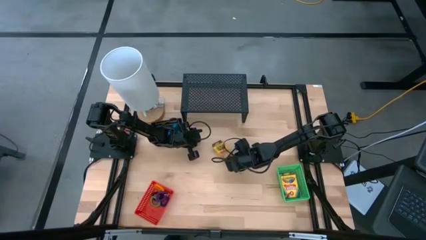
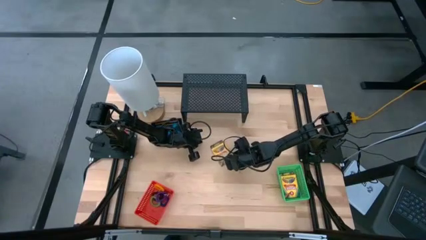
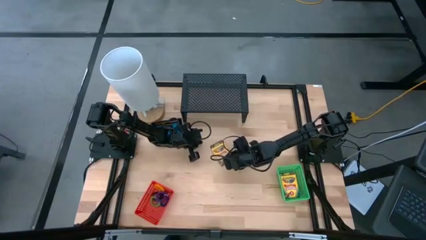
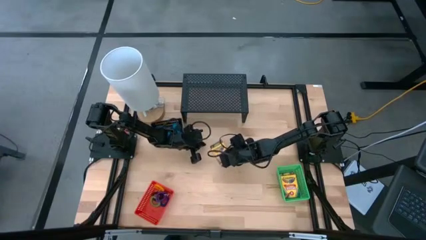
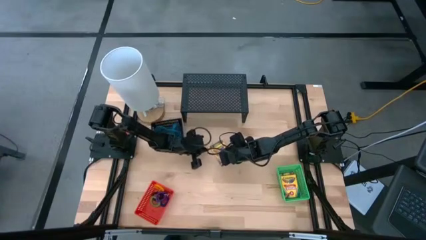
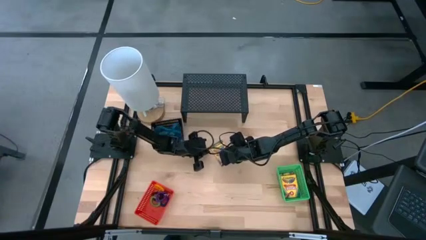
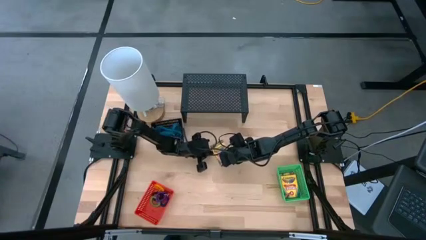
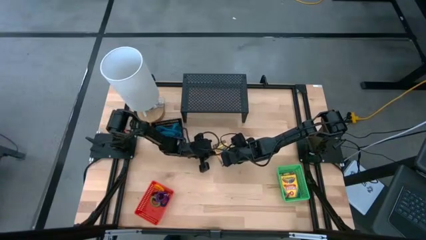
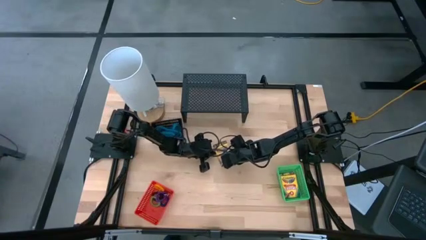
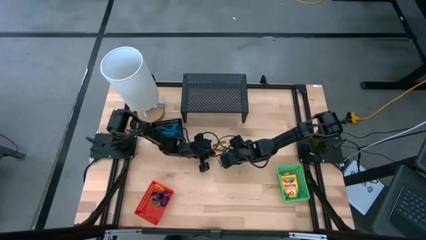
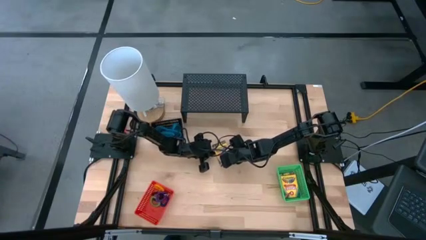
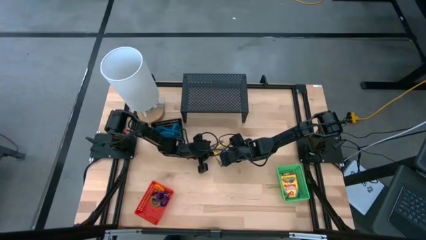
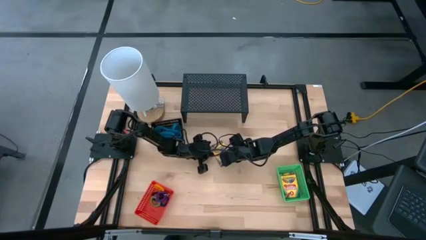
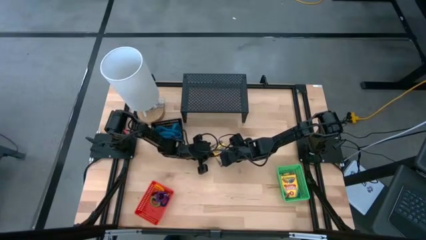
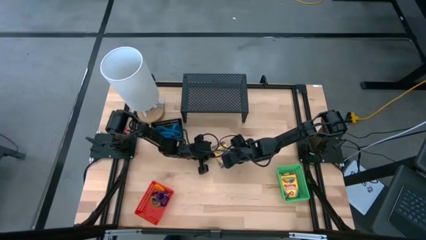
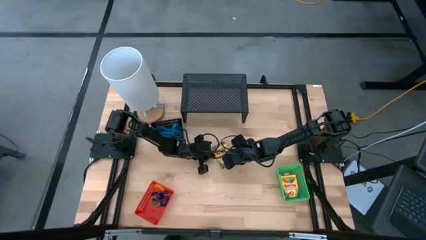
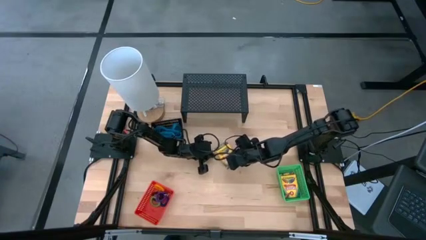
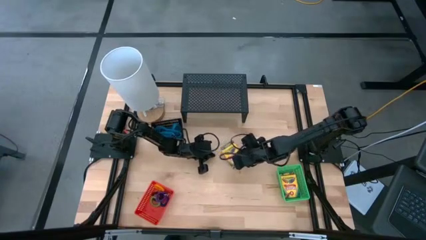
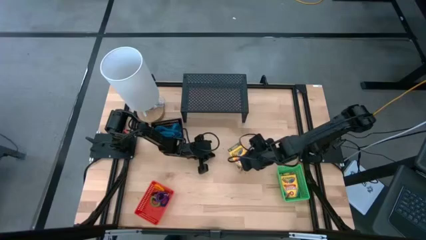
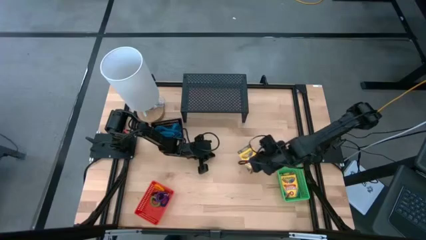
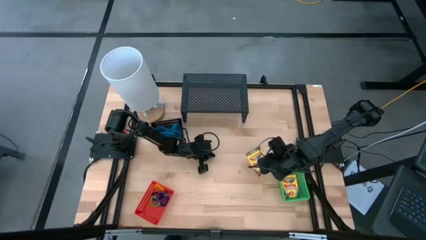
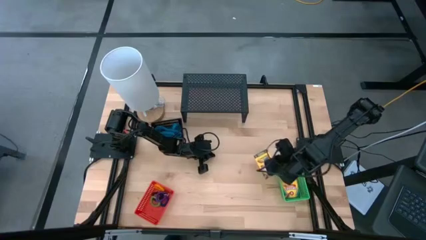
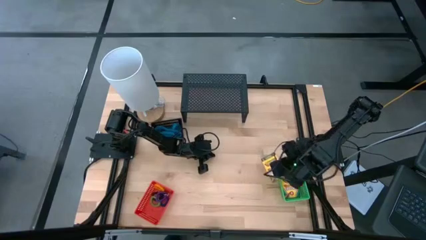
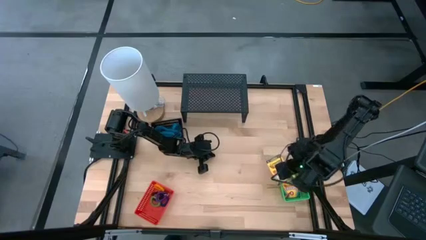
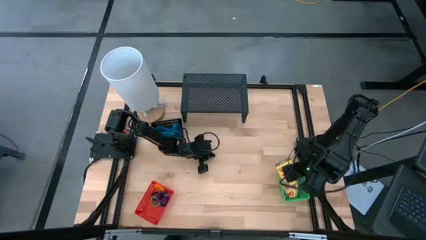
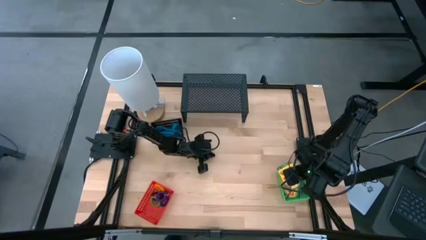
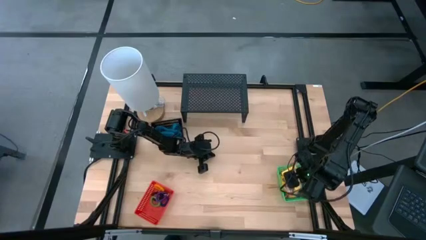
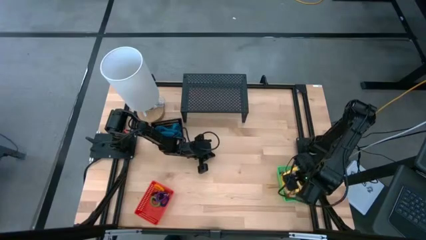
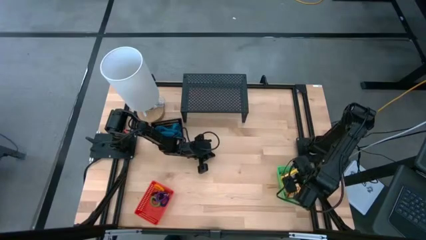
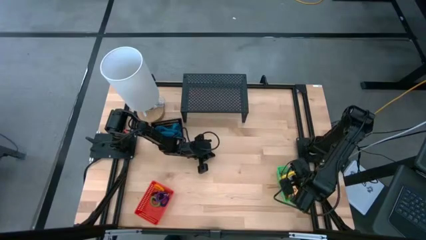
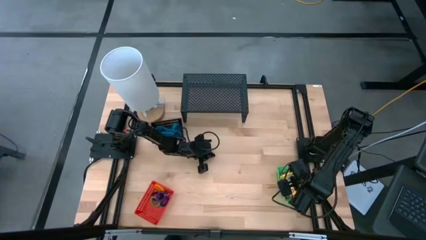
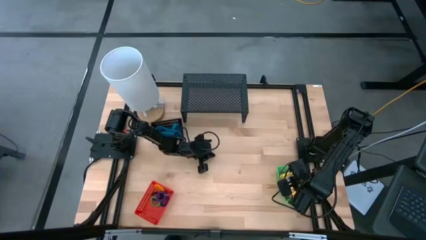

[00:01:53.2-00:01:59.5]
Task: Pick & Place Office Desk Supplies
Put the crayon box into the green bin

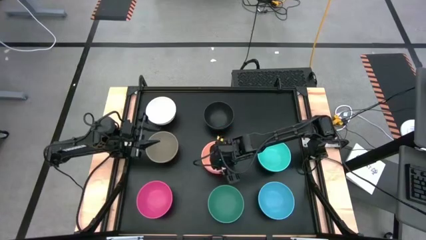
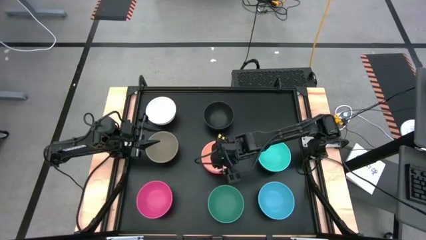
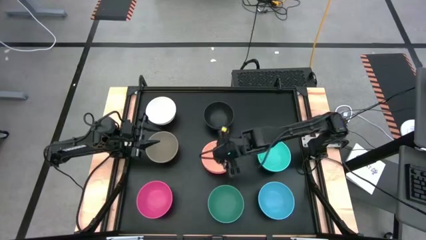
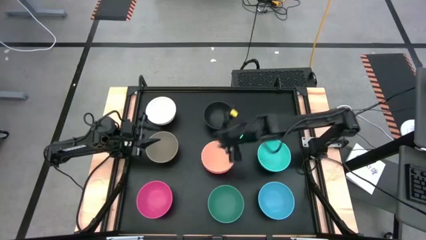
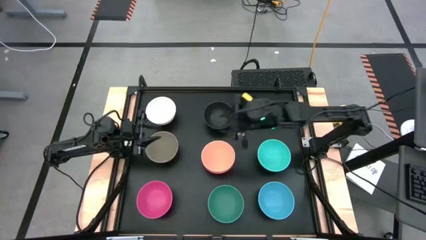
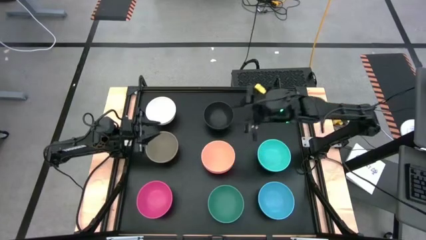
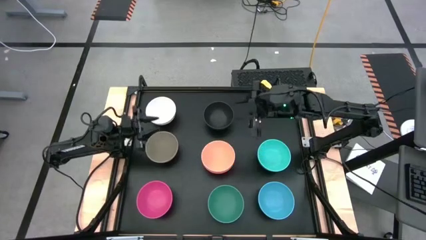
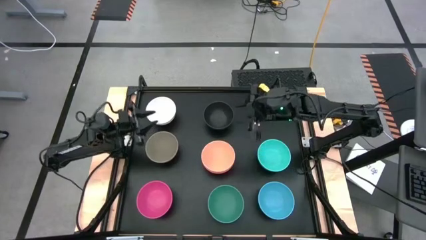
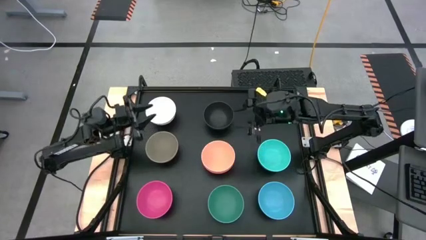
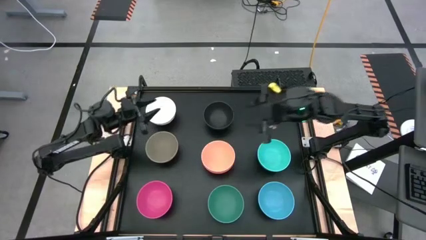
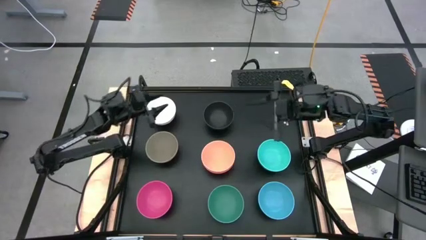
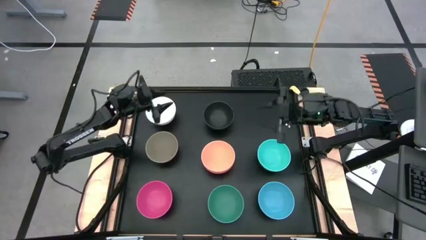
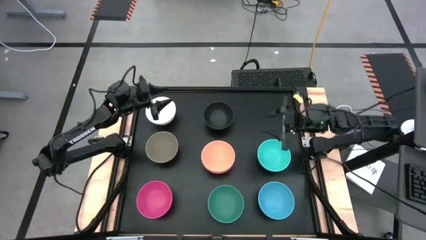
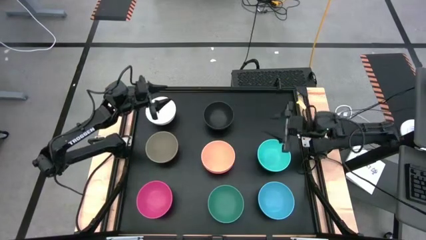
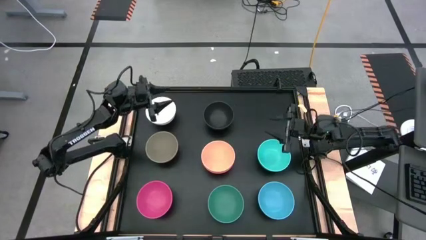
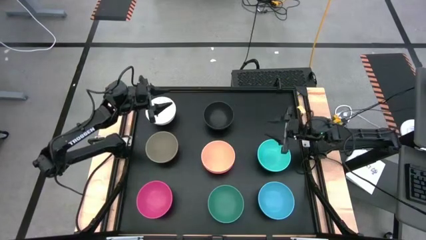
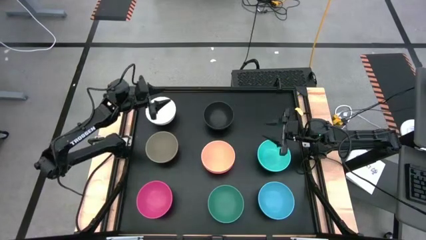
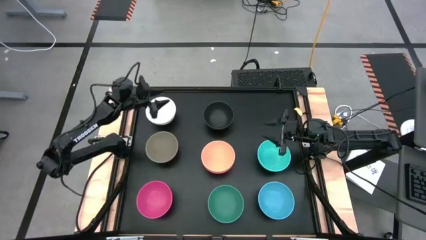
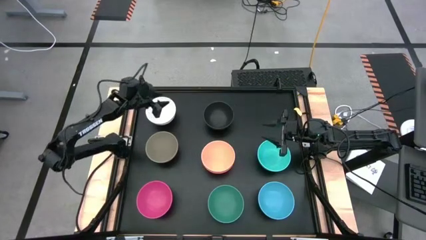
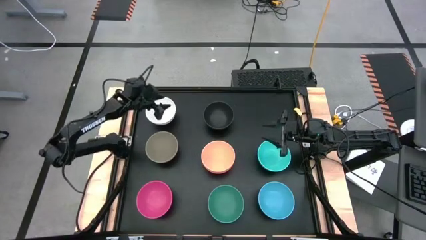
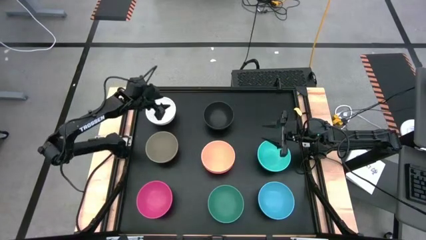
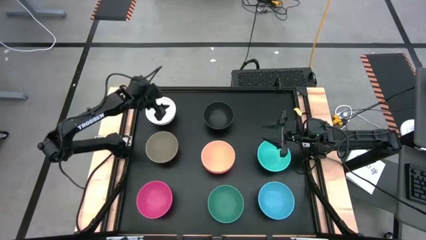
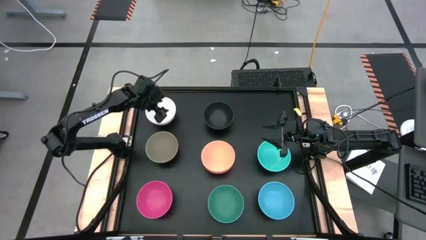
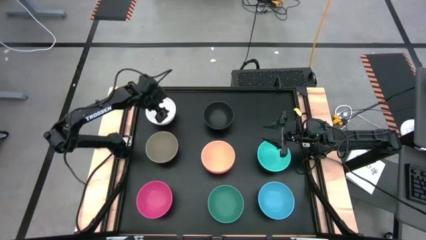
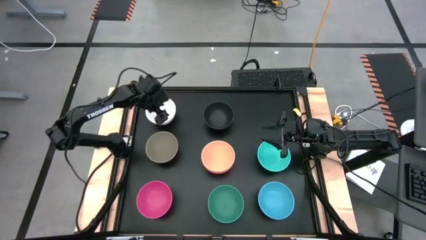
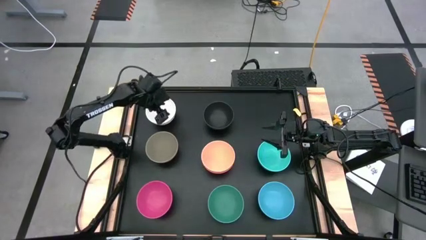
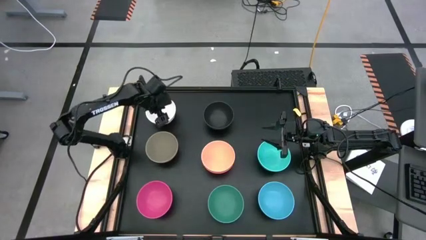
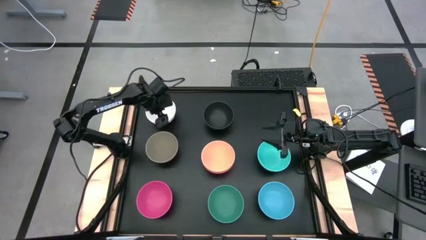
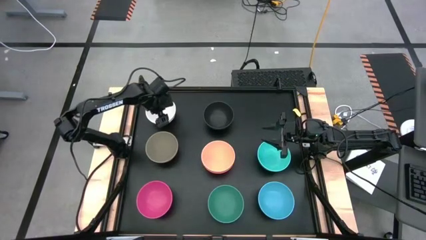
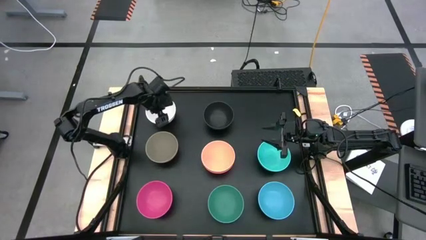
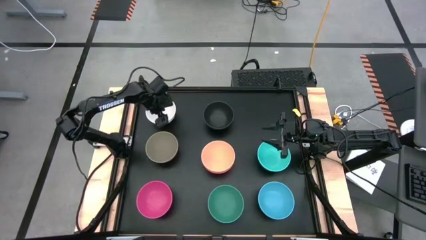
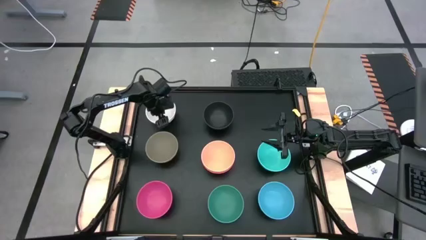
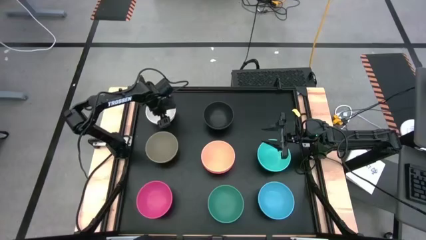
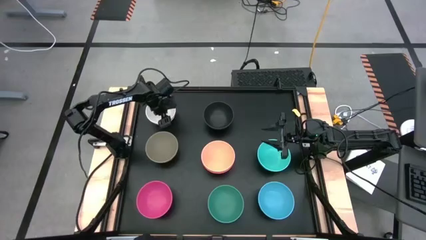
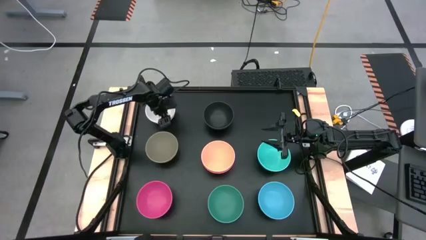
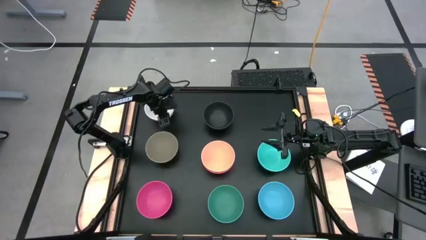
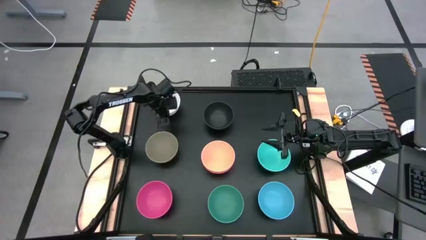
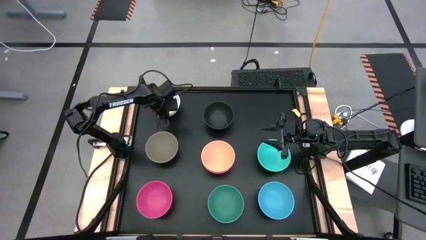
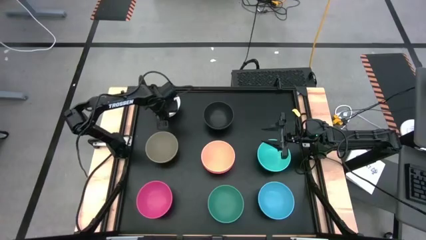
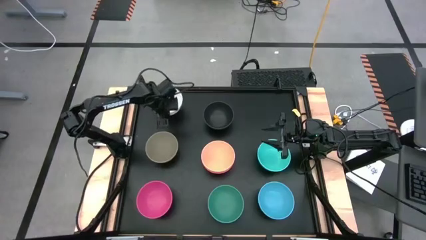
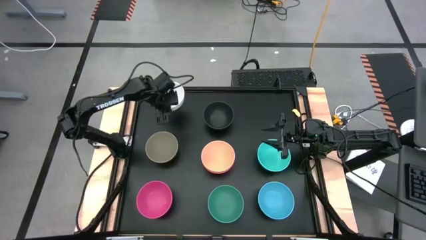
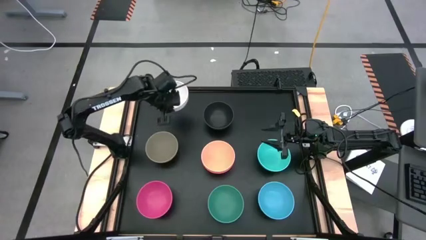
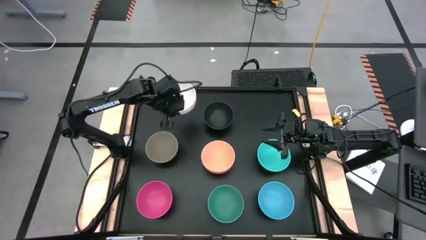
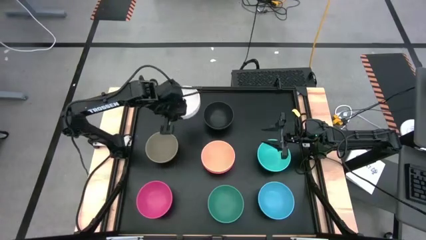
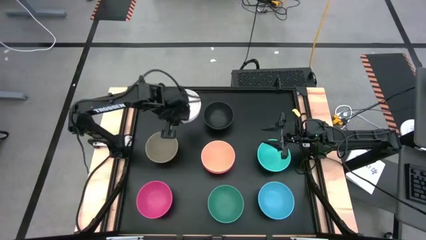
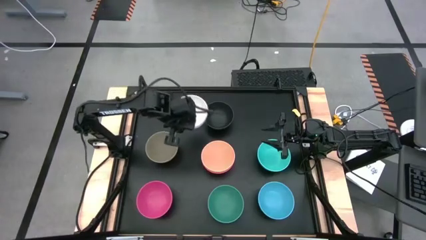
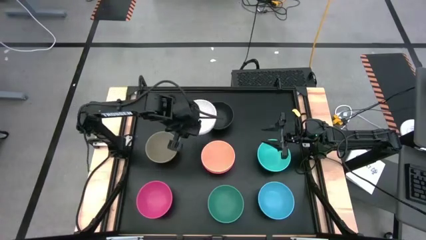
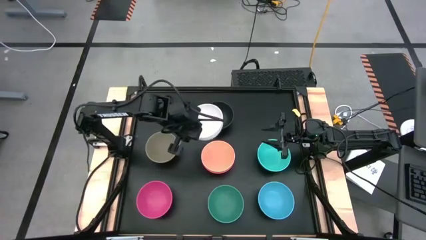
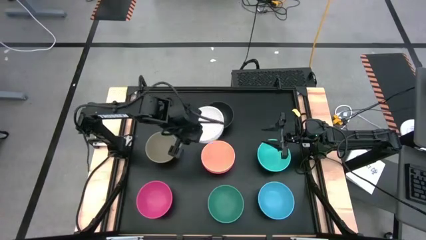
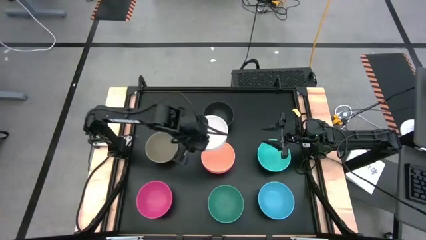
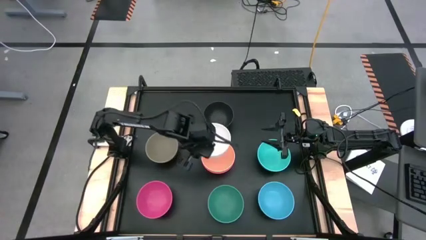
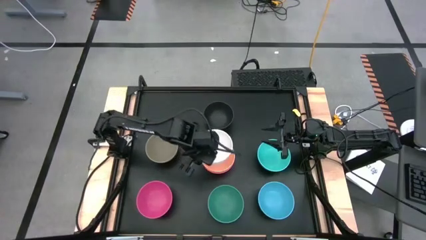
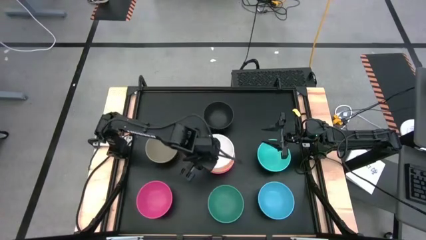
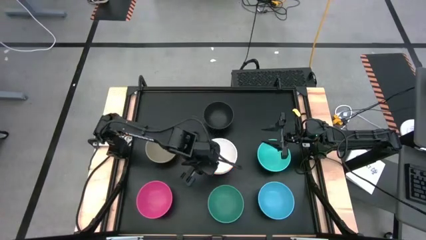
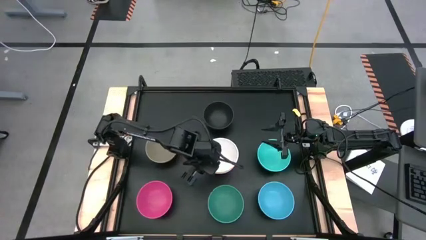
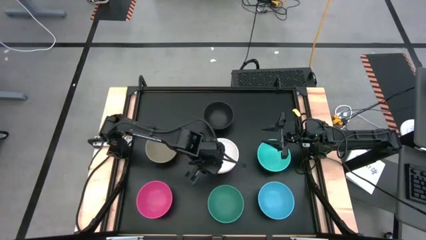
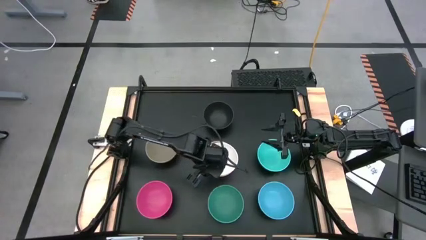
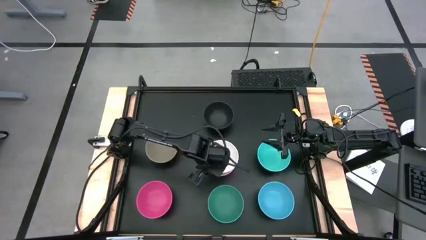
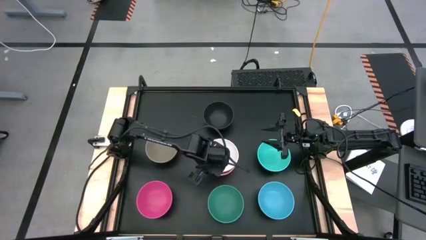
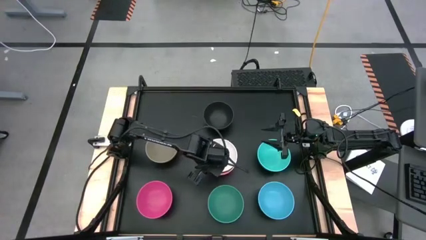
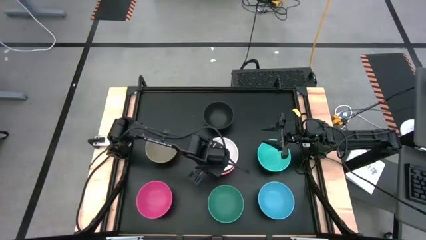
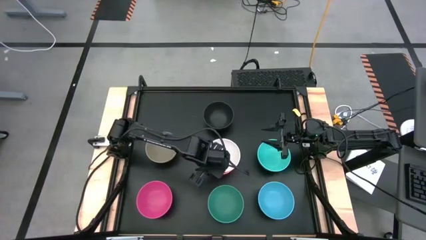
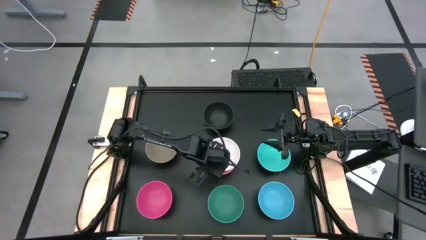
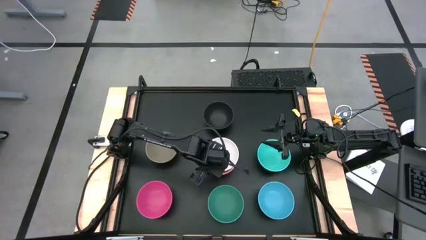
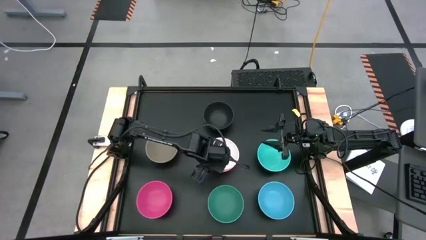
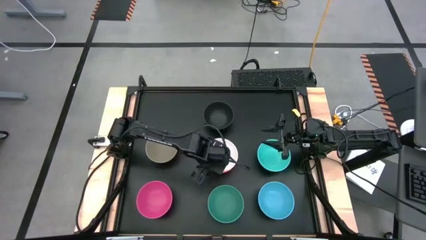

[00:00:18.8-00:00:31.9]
Task: Nest bowls inside each other
Stack the white bowl on the light orange bowl
